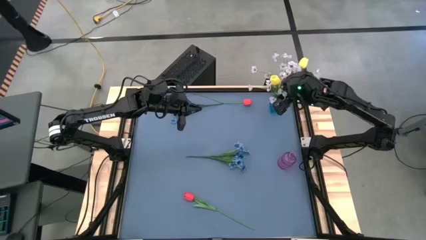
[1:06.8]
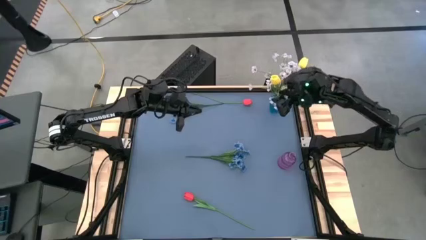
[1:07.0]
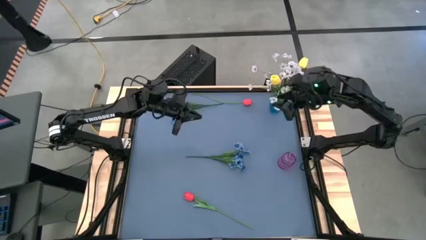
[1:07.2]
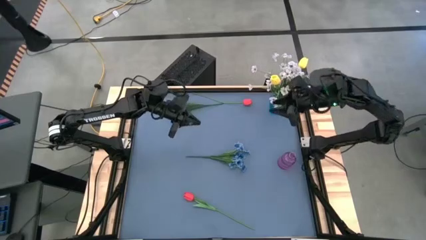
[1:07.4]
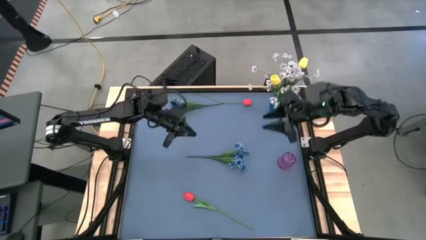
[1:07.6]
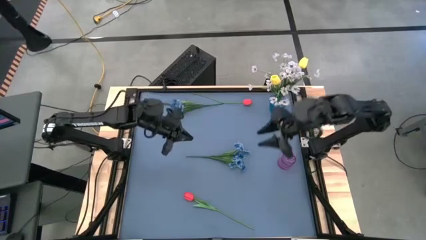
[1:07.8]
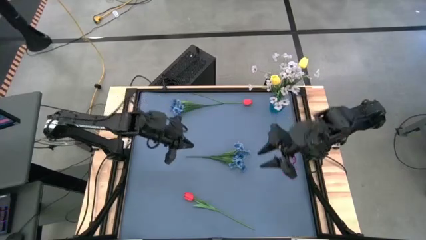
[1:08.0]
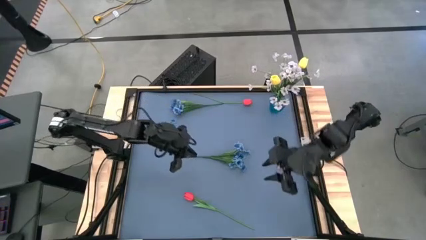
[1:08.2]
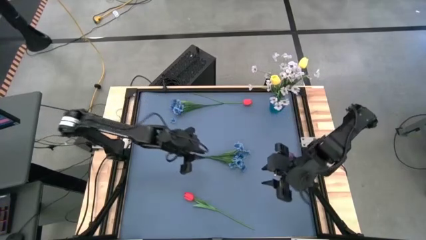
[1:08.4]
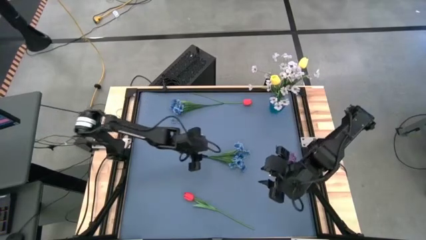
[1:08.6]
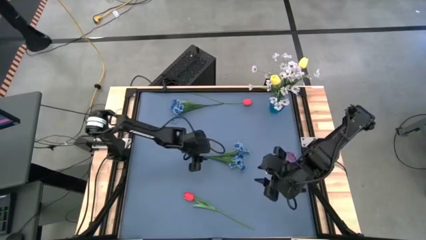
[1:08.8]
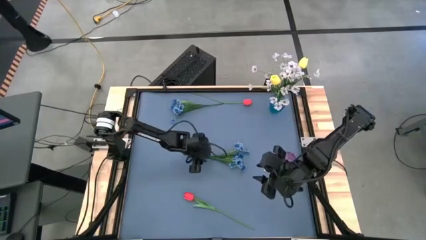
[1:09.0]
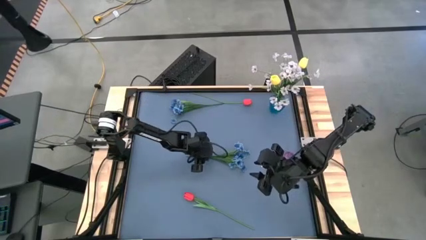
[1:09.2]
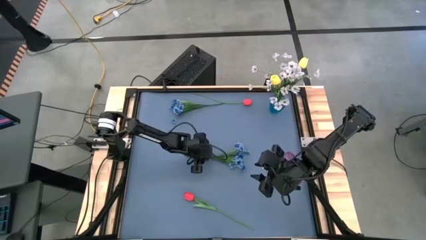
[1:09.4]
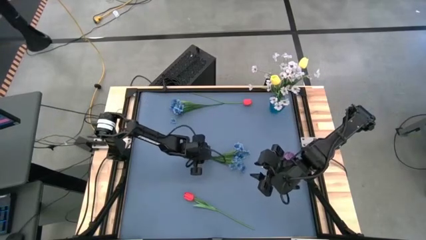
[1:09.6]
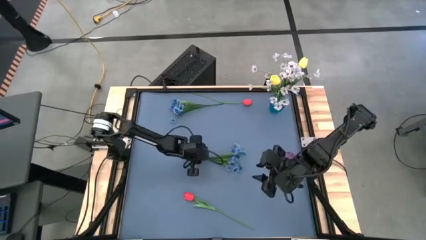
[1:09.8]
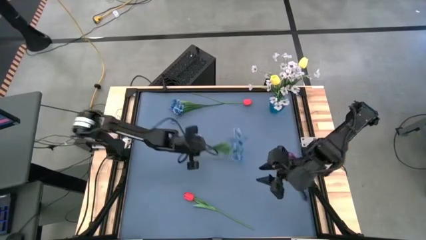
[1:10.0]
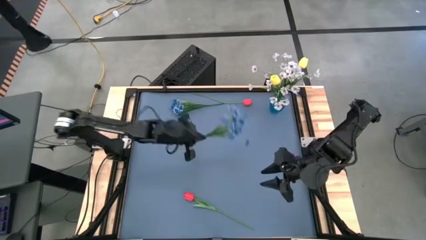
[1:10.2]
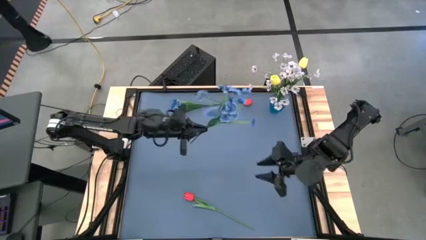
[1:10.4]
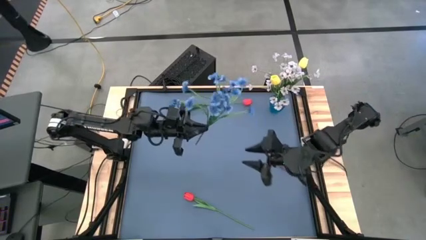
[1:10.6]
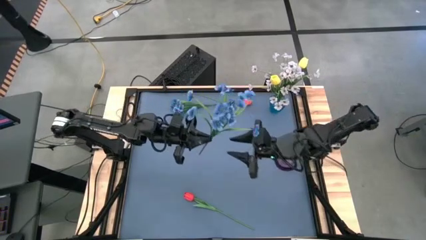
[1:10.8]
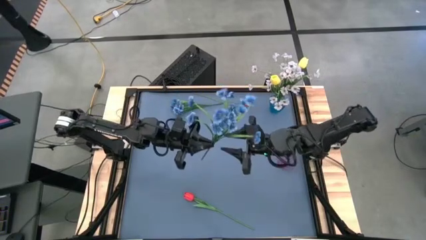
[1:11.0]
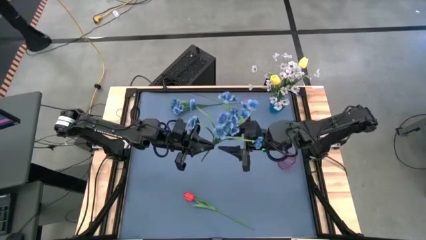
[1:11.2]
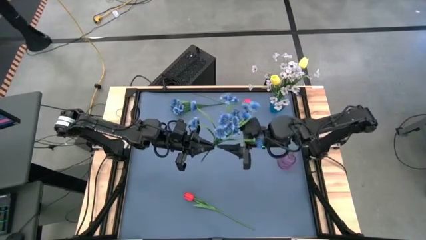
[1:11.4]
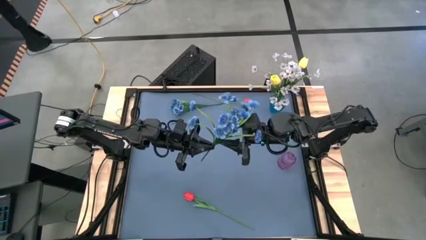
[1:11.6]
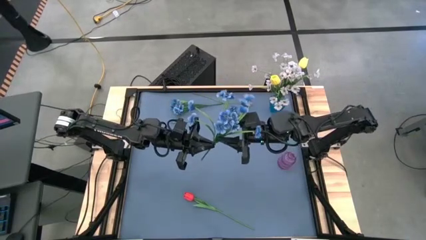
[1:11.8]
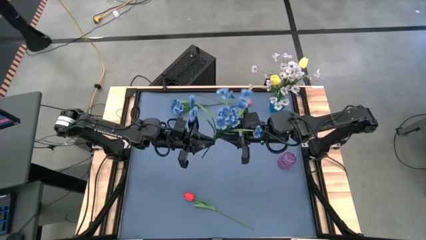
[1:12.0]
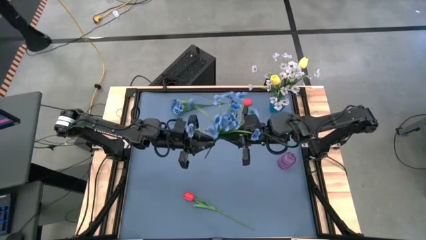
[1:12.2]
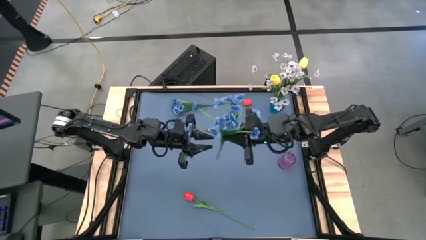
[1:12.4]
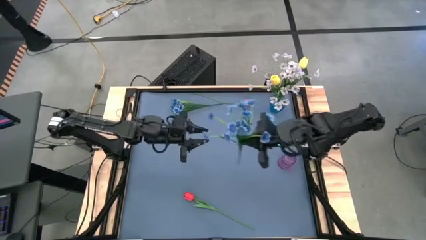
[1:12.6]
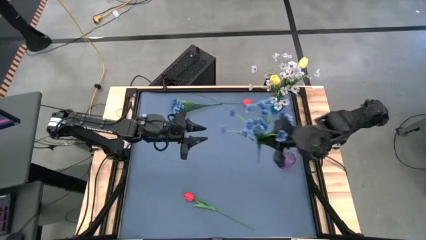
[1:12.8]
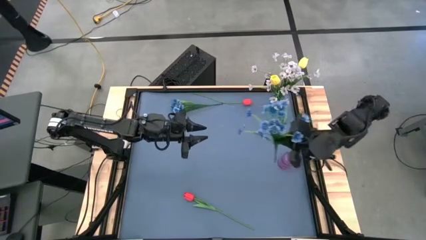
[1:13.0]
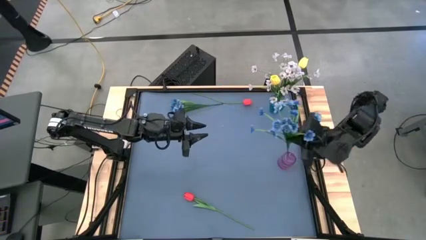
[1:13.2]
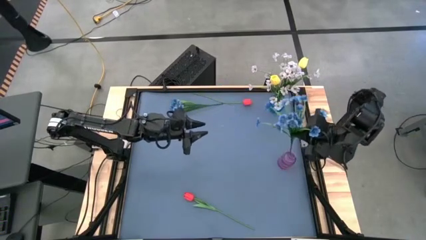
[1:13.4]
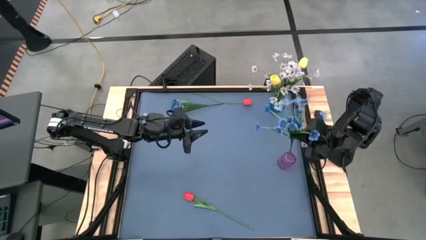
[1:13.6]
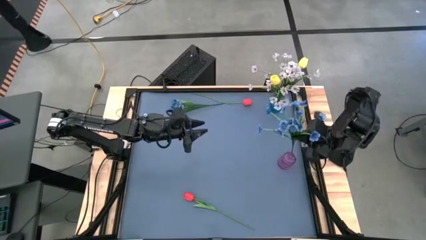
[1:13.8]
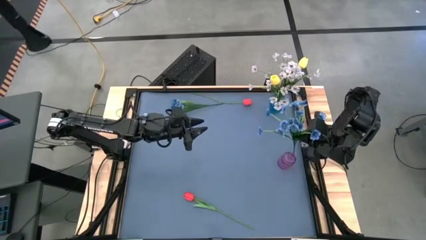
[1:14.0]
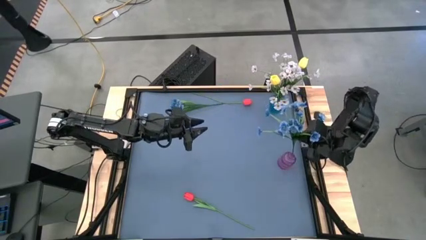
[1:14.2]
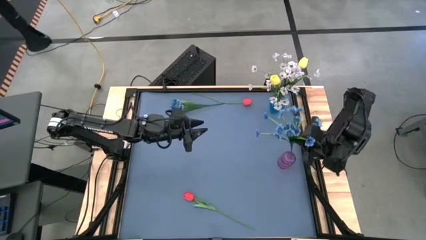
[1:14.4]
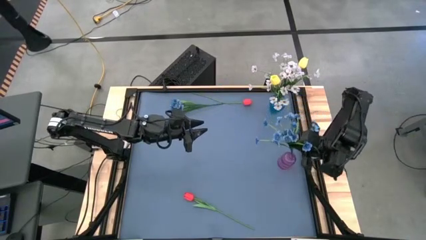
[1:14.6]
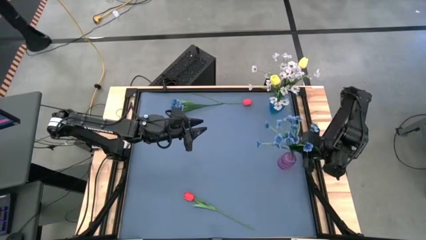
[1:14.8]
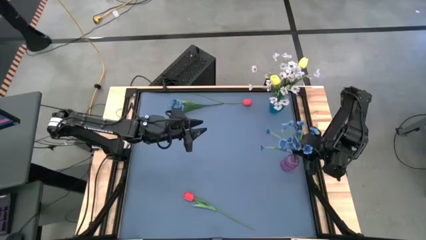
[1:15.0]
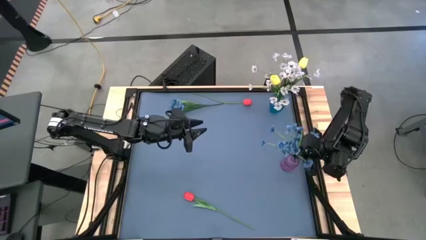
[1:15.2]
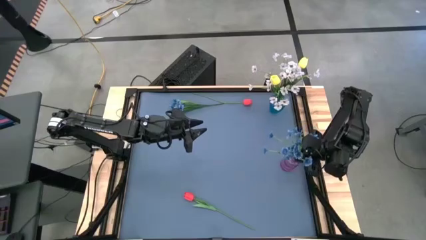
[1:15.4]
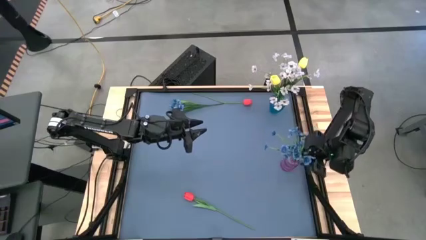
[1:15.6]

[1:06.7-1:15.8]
Task: Sort flowers into vase by color
Put the bottom blue flowers into the violet vase

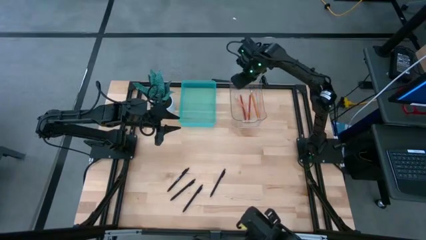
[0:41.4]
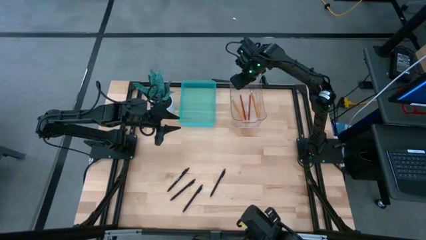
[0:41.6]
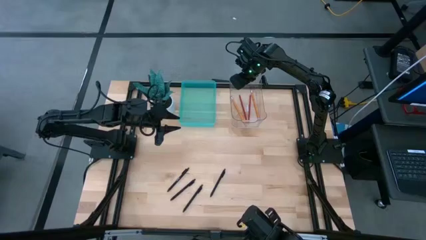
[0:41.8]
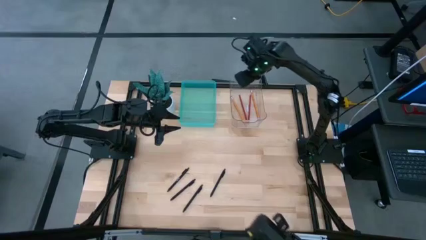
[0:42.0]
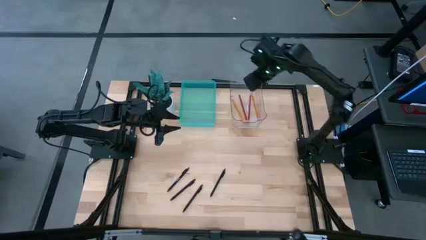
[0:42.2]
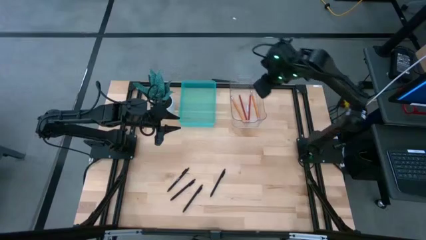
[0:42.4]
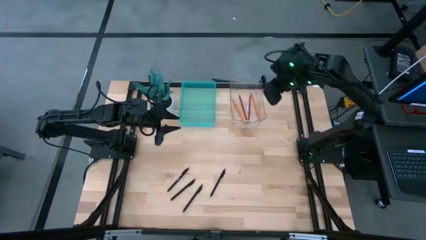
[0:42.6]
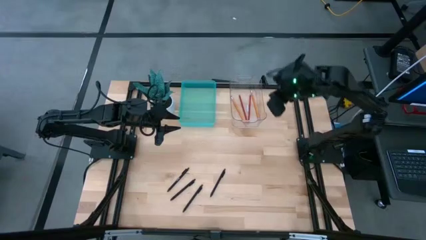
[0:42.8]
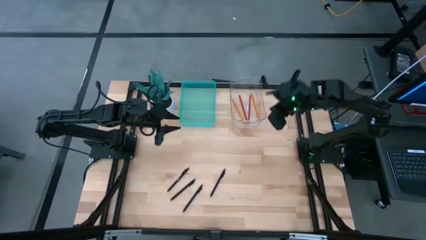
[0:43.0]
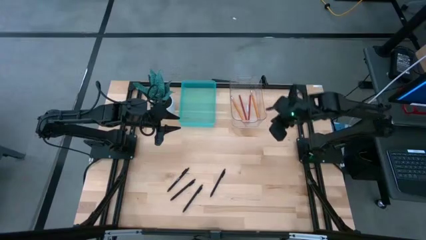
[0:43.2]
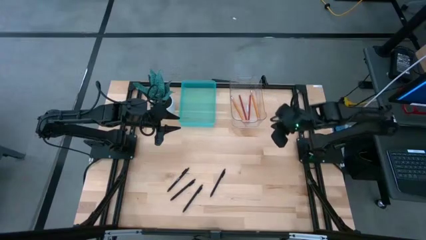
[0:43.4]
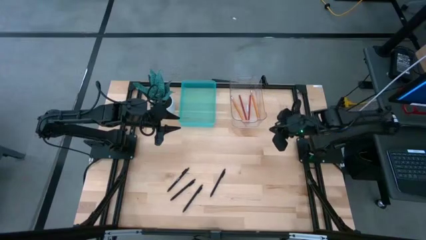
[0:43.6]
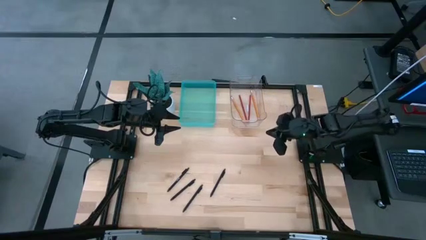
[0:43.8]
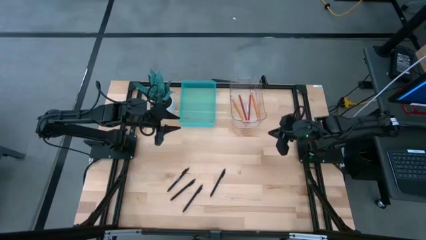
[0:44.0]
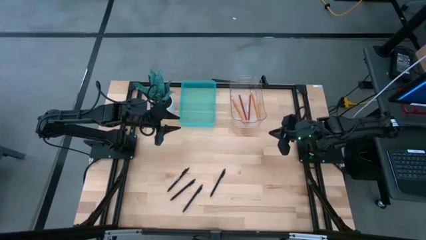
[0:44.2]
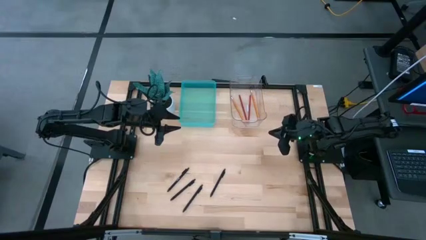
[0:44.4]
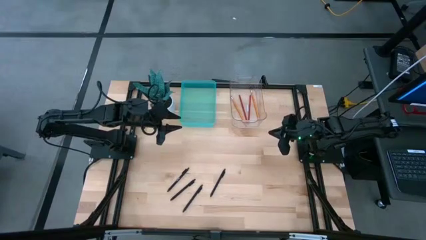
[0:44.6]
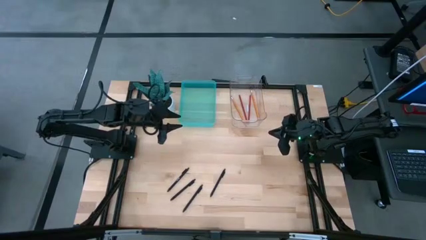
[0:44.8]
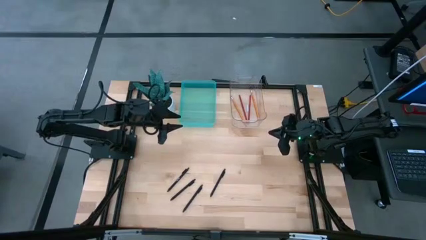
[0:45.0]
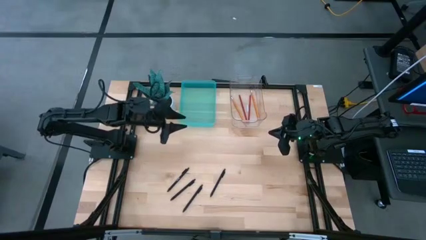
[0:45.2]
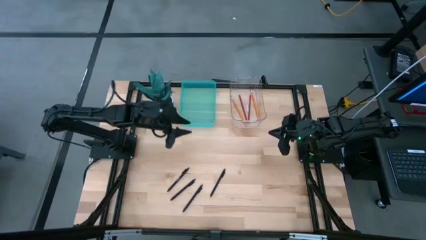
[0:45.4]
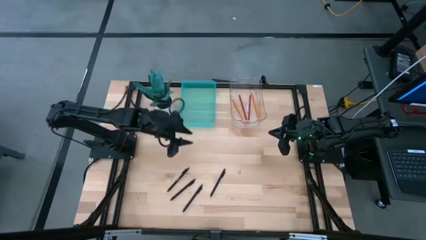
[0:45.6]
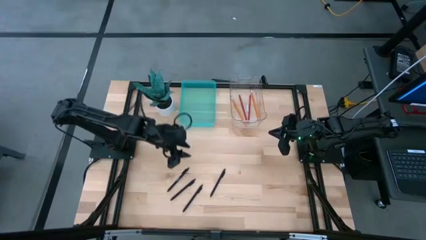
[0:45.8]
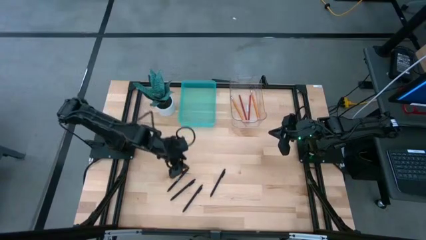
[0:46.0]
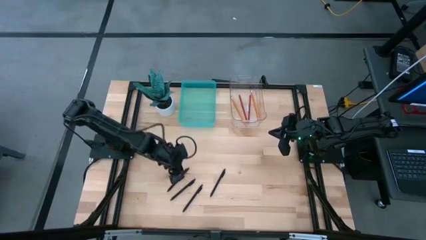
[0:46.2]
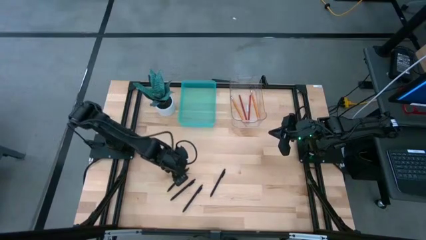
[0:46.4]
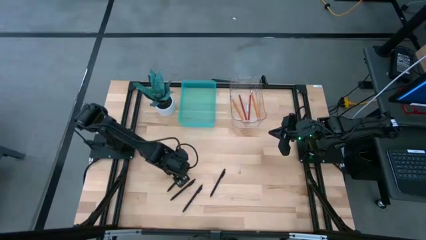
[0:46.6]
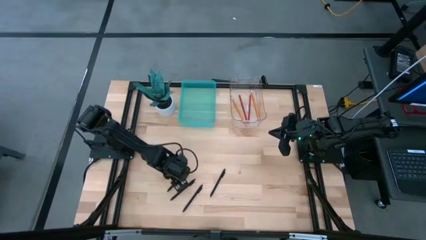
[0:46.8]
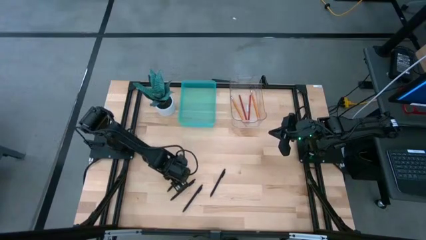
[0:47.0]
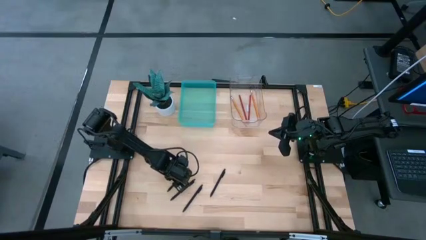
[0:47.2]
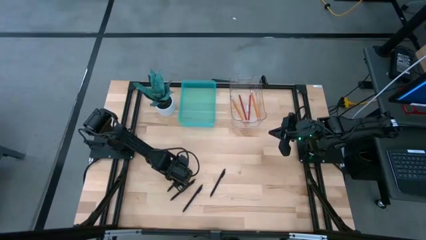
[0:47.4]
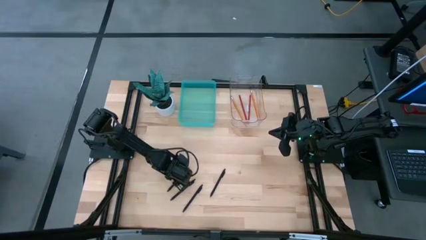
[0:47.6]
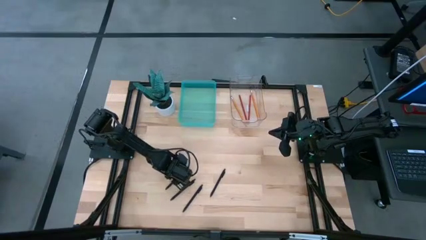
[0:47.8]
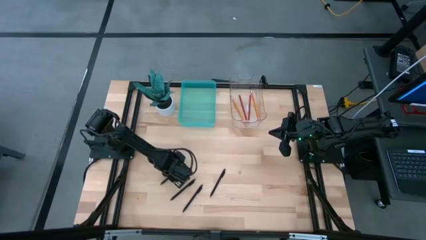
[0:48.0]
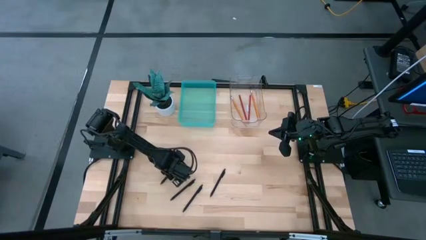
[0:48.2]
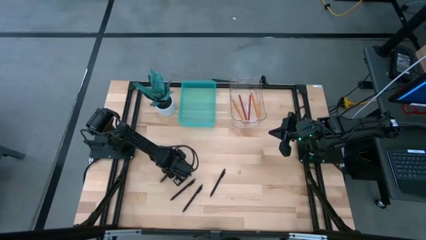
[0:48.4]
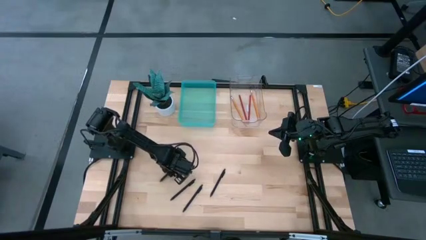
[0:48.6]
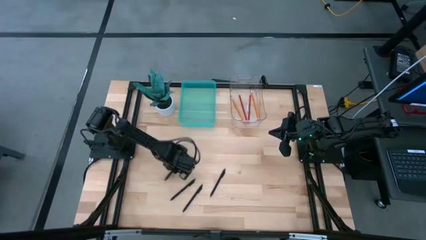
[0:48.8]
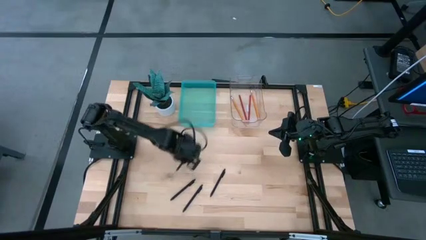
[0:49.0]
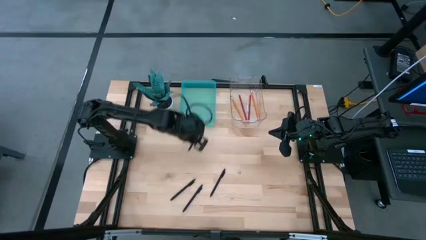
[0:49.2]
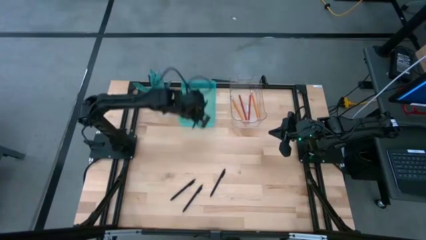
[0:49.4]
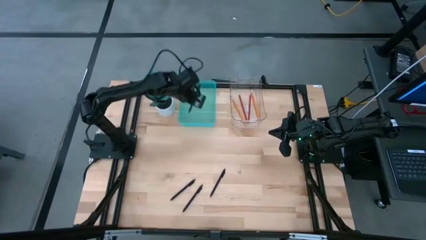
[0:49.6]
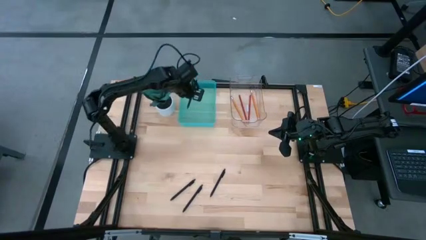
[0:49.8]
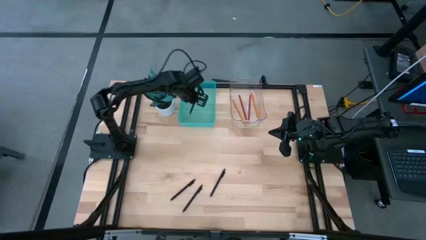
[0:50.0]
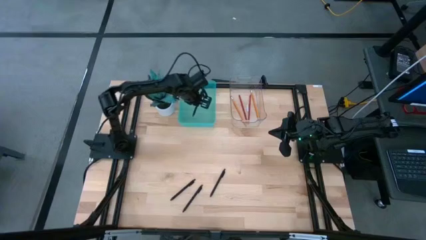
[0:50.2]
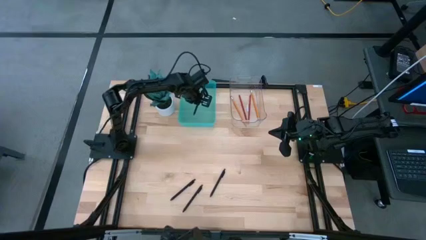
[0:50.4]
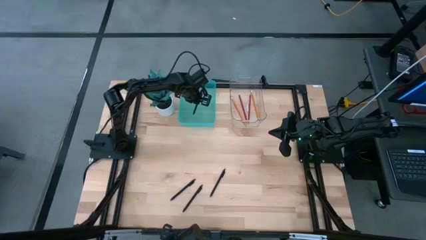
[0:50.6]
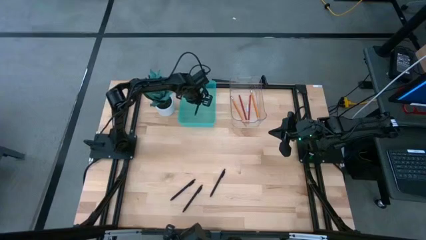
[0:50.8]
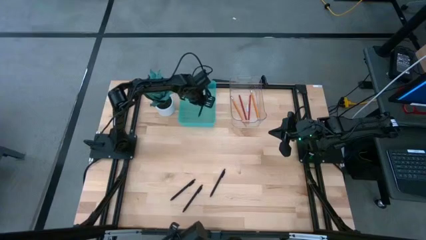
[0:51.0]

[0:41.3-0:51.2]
Task: Sort pens & pencils
Put the black pen into the green bin
